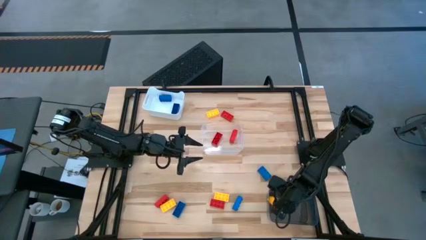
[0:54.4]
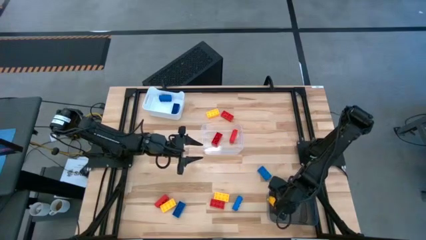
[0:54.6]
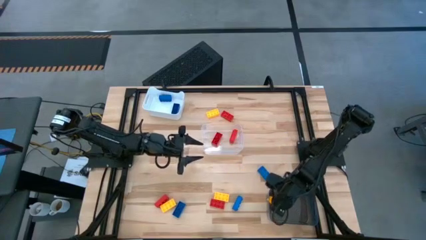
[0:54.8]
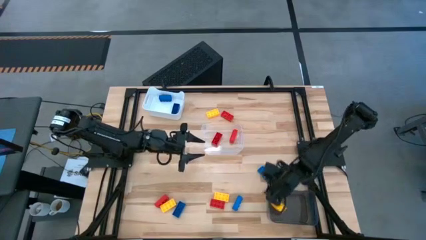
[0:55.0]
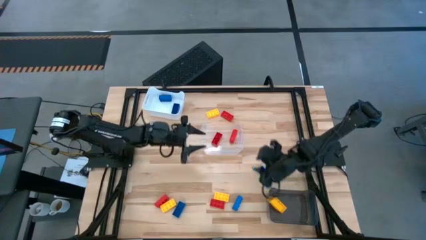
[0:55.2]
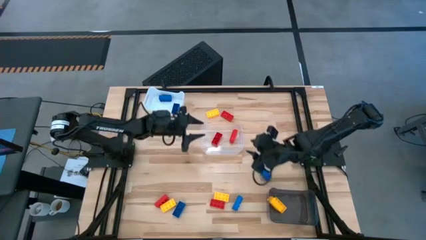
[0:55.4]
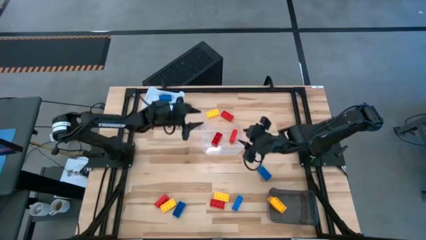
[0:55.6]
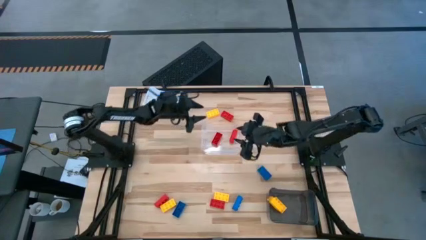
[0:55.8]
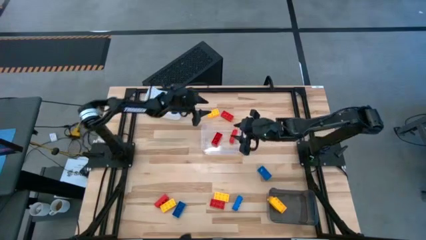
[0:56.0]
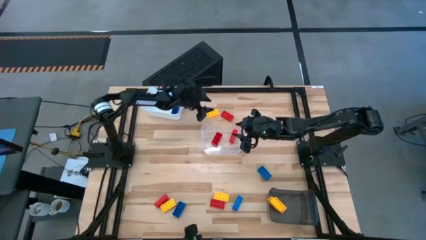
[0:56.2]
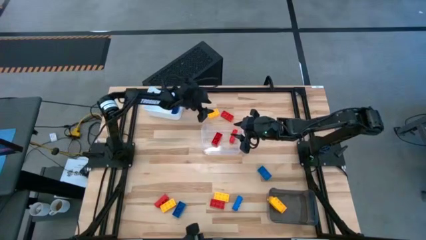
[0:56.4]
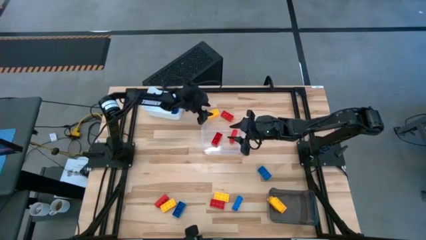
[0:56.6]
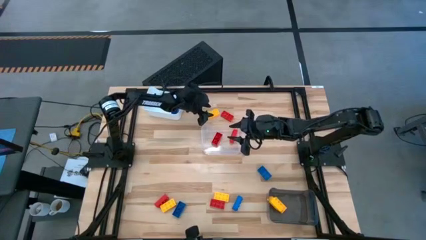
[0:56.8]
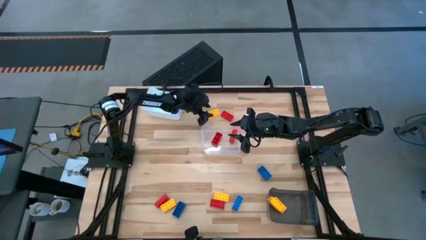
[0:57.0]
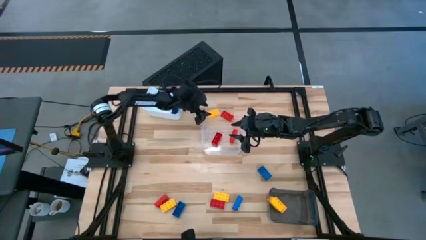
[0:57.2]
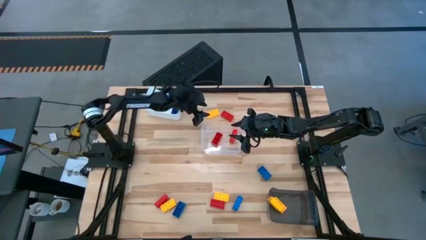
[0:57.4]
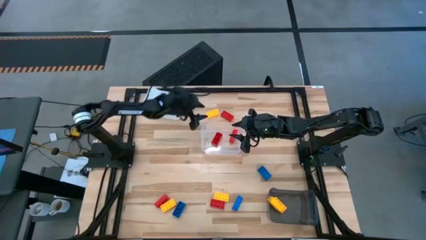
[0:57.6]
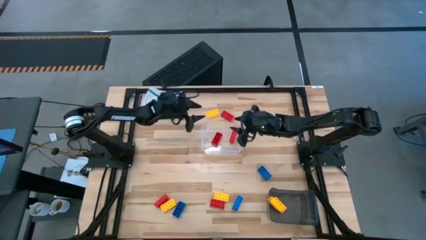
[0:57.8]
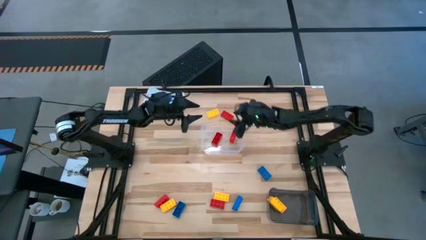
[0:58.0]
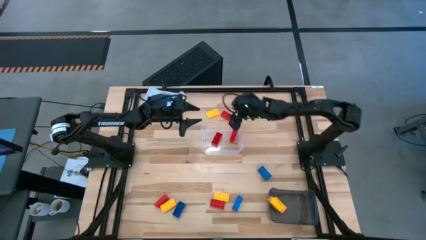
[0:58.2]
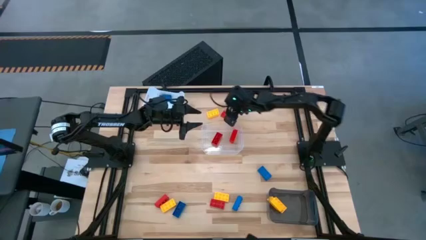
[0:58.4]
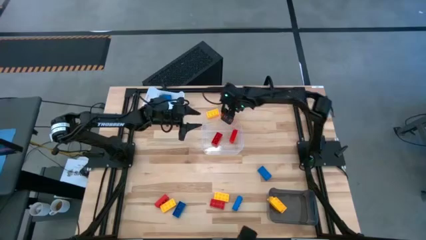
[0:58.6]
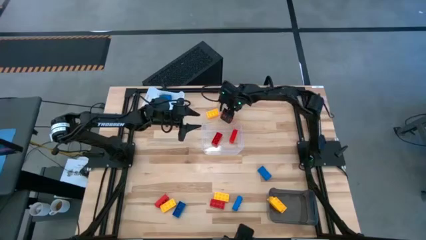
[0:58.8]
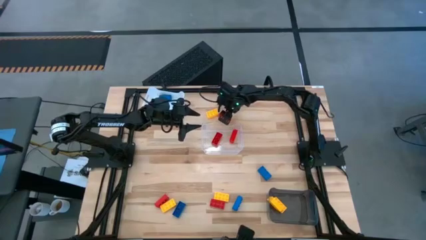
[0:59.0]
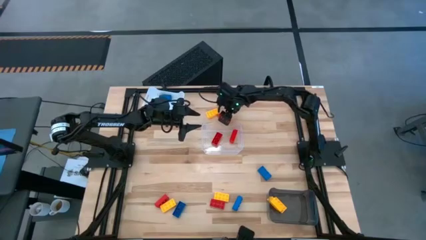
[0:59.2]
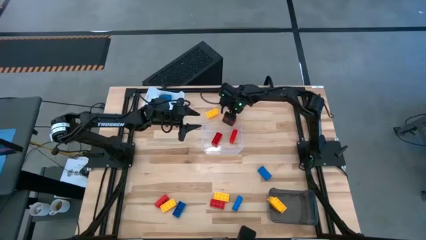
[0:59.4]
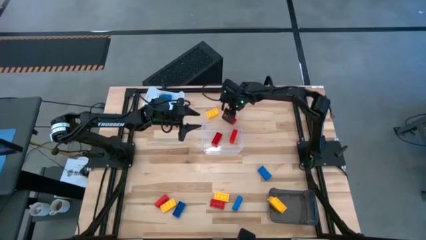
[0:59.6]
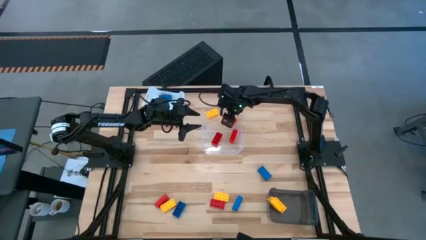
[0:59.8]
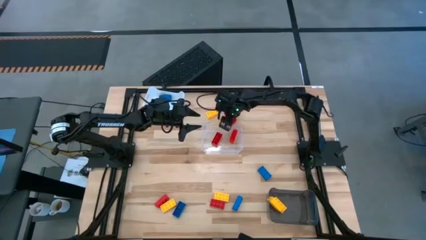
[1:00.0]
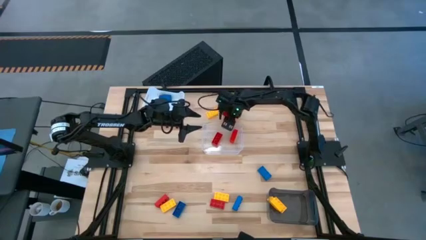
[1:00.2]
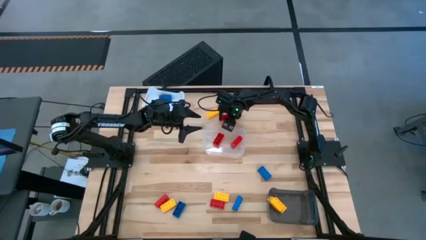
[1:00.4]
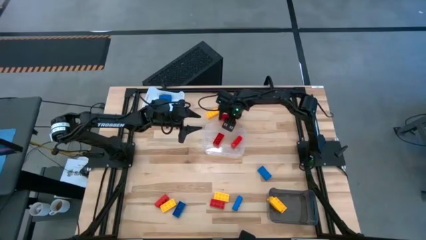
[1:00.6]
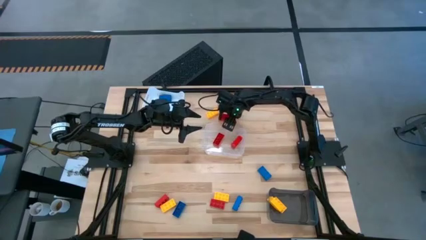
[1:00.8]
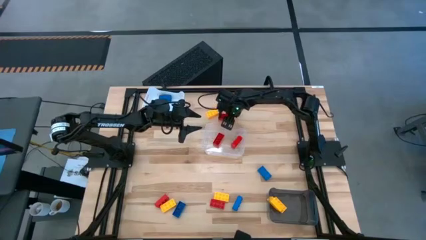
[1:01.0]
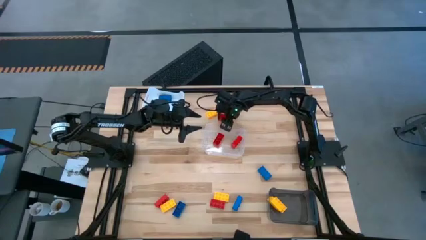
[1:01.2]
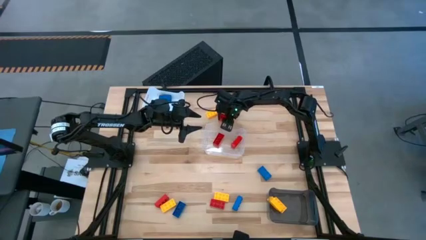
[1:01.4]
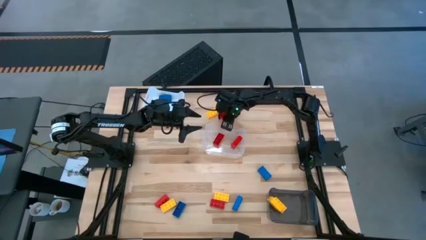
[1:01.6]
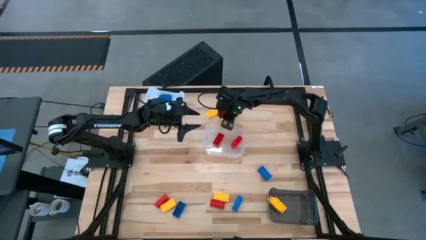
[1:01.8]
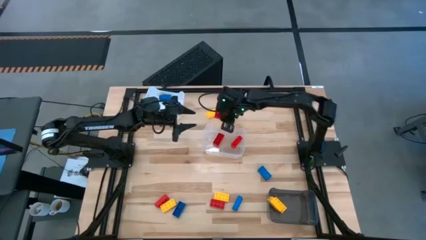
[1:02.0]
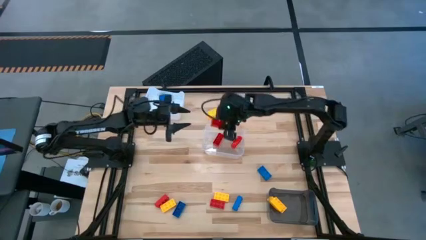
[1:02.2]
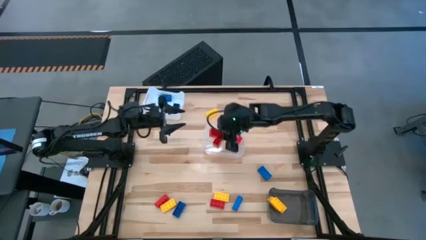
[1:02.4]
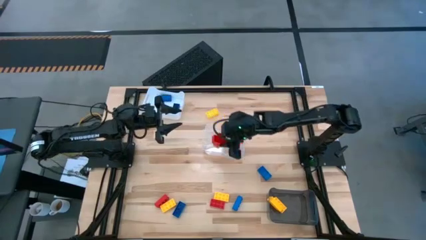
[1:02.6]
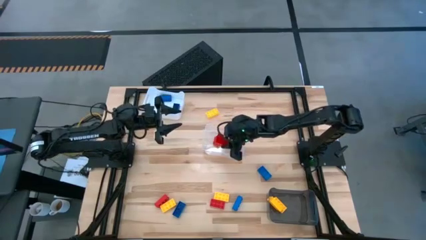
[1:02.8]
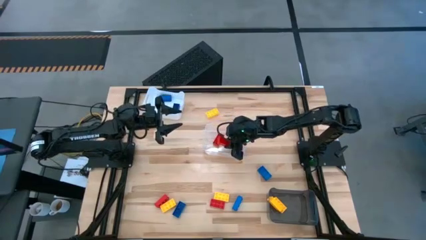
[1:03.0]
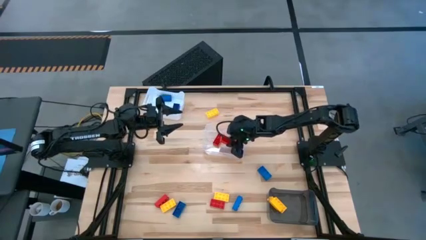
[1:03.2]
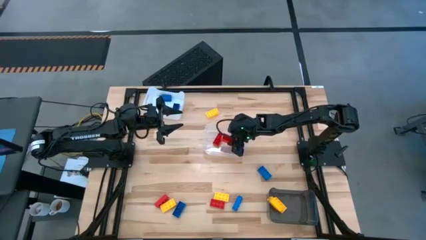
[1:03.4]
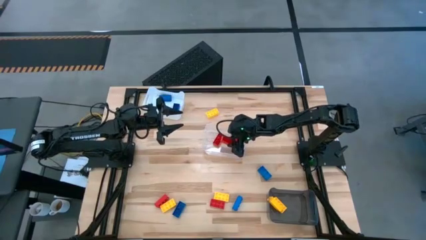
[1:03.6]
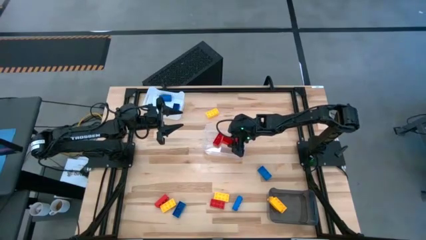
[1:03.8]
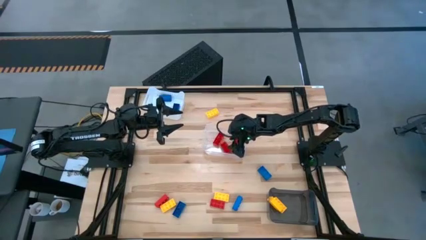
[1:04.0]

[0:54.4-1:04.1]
Task: Sort & place blocks by color
Put the red game piece into the transparent bin

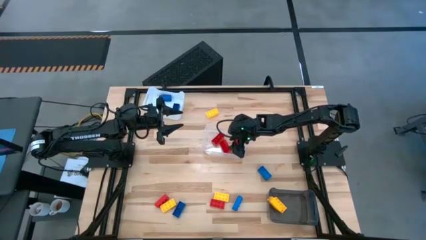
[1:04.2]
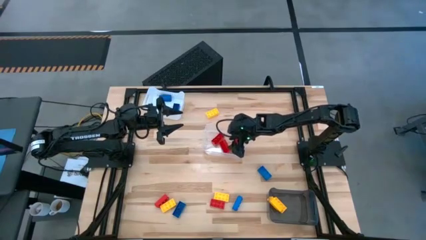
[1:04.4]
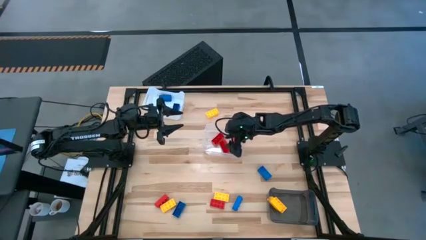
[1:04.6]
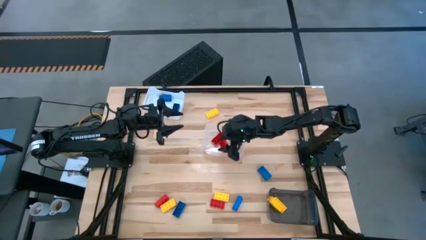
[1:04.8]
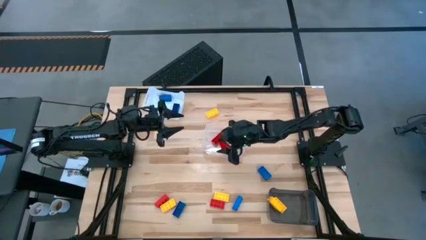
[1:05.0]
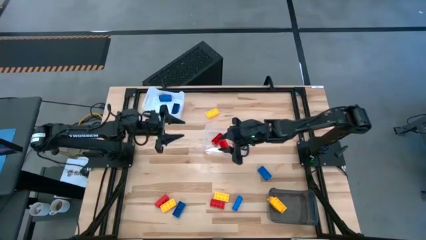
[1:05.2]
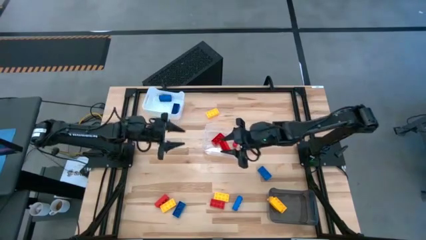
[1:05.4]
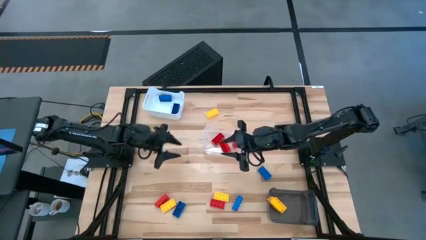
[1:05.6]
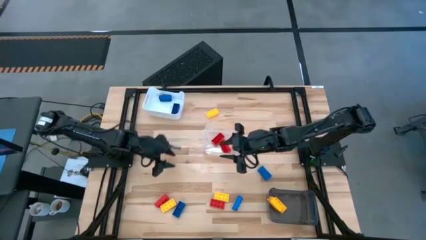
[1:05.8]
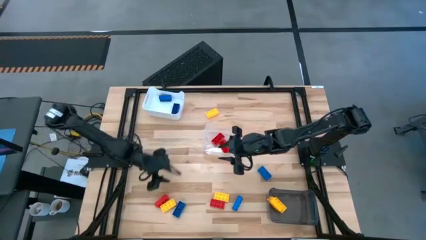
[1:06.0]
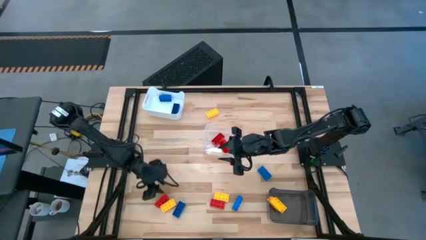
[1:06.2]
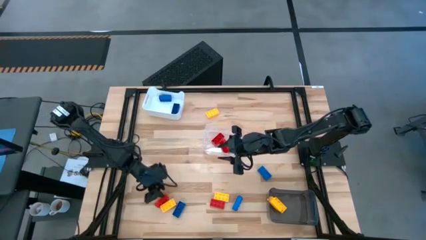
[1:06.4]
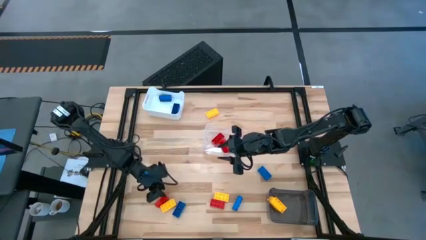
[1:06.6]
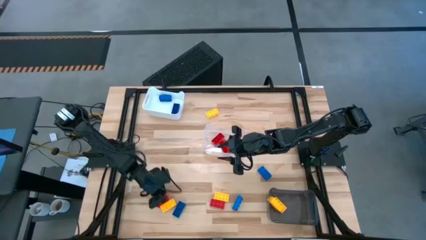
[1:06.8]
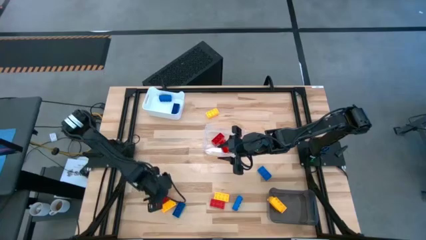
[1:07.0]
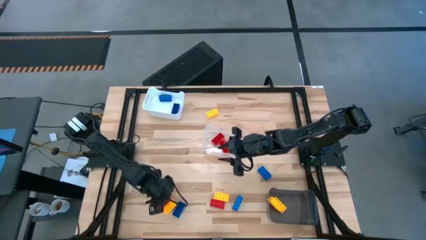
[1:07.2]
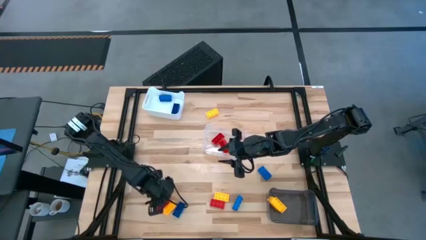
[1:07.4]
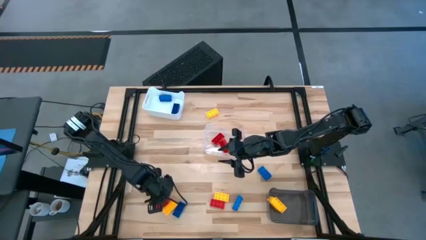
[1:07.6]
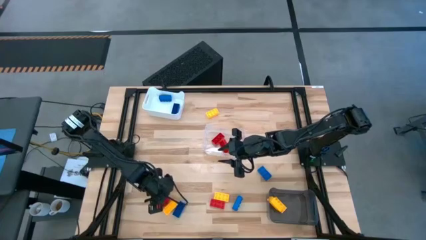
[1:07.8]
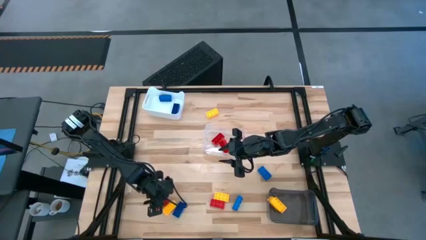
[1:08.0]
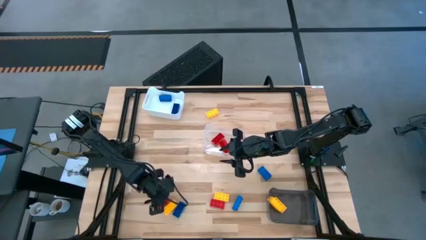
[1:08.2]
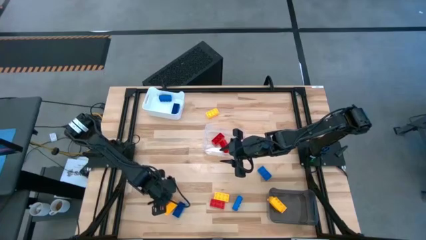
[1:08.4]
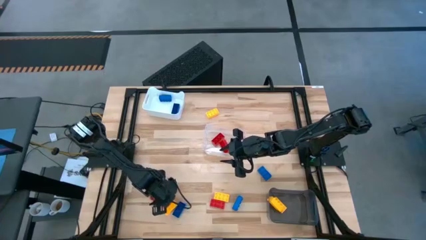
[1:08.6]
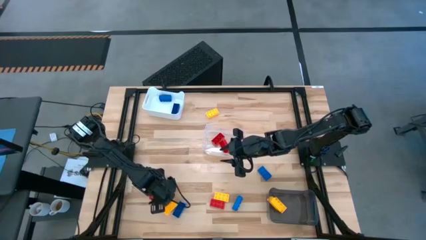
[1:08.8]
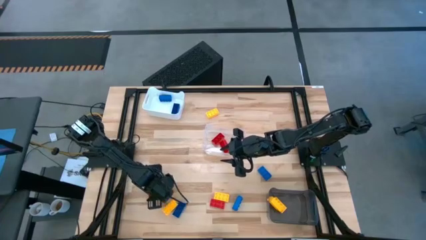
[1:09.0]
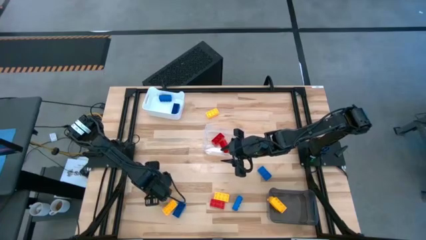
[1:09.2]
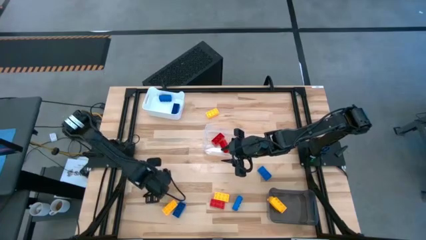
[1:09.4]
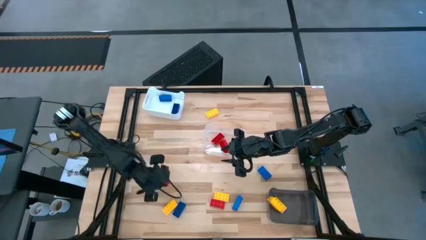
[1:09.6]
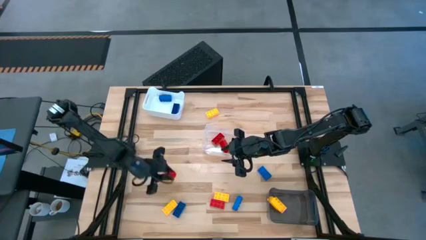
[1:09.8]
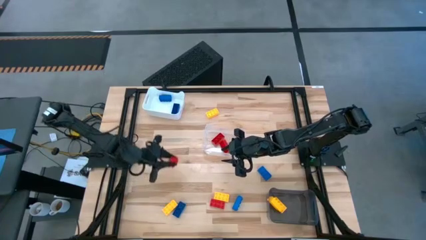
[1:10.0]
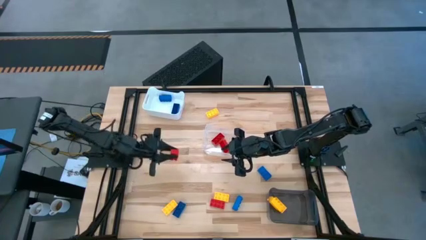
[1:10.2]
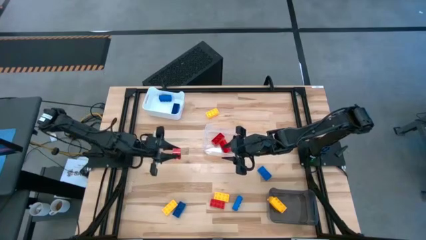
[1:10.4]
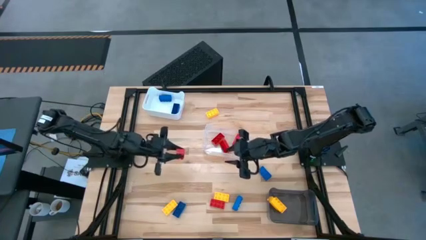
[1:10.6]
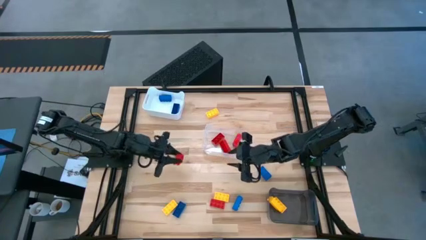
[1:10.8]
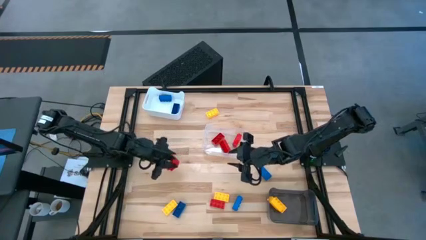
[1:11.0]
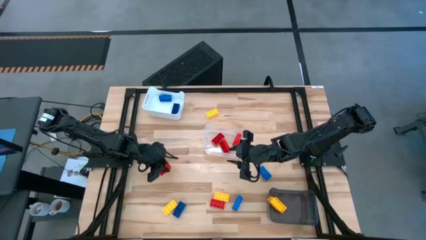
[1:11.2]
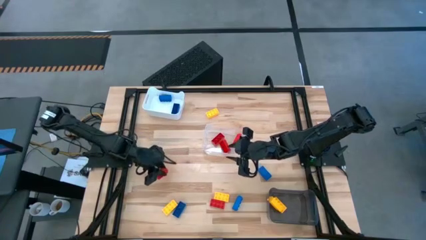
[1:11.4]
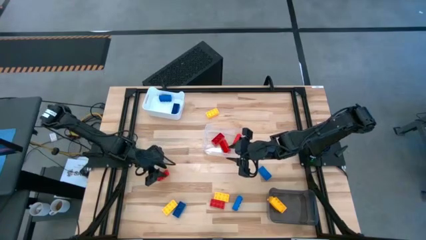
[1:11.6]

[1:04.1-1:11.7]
Put the red game piece into the transparent bin
